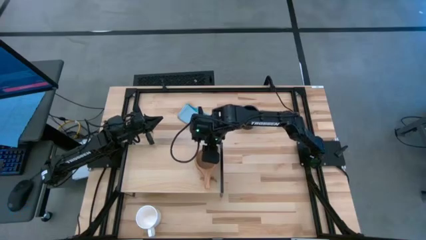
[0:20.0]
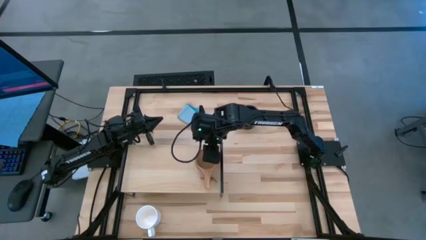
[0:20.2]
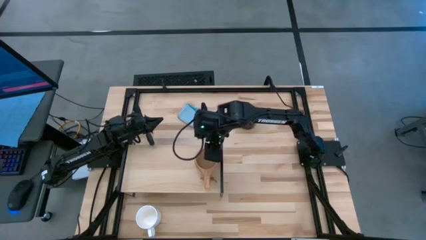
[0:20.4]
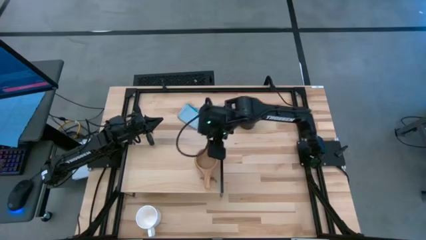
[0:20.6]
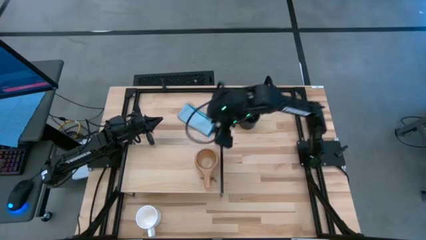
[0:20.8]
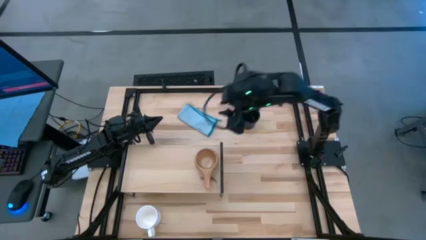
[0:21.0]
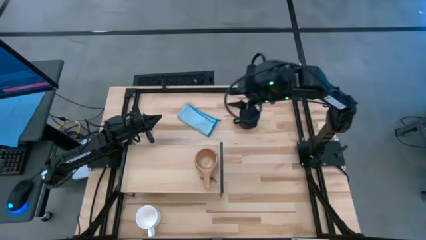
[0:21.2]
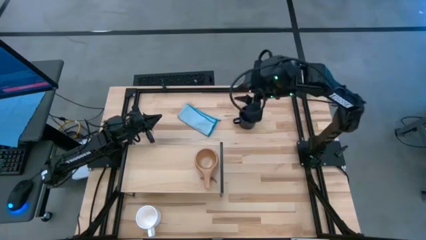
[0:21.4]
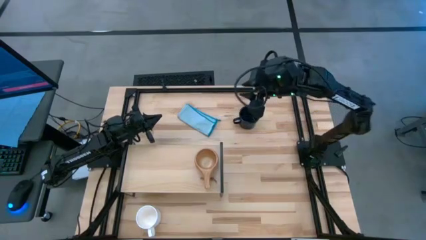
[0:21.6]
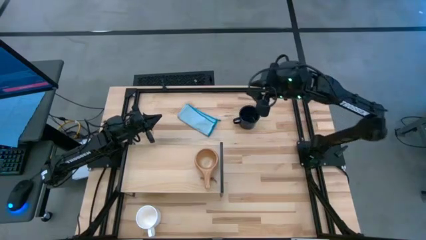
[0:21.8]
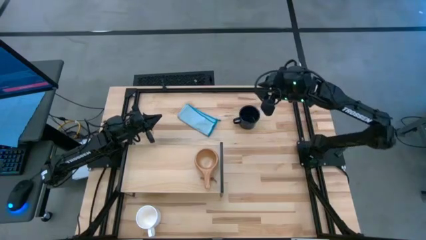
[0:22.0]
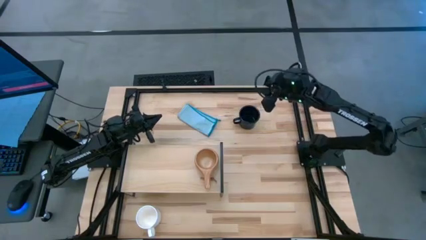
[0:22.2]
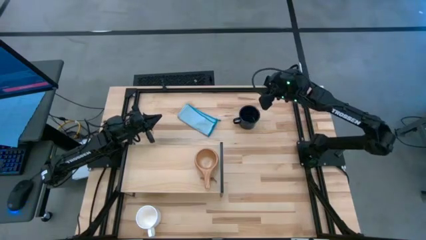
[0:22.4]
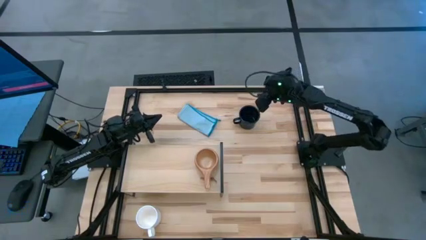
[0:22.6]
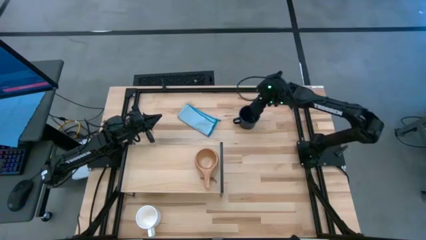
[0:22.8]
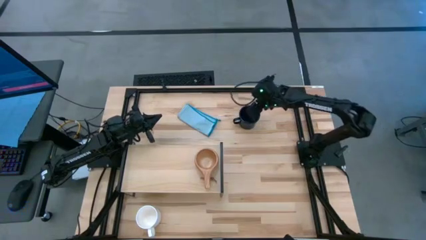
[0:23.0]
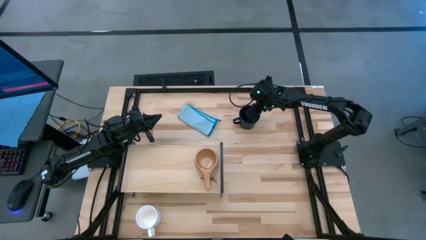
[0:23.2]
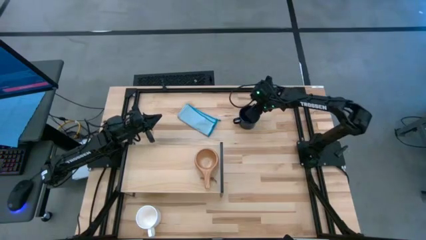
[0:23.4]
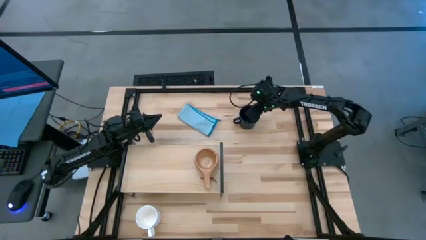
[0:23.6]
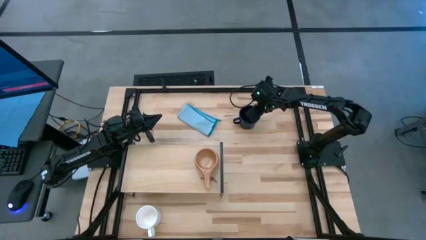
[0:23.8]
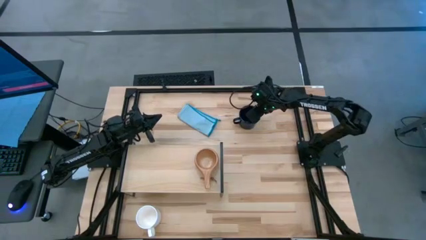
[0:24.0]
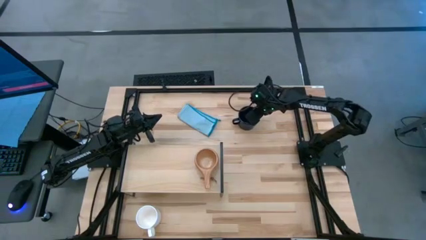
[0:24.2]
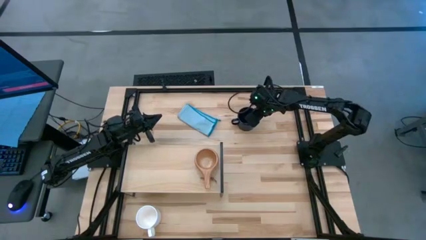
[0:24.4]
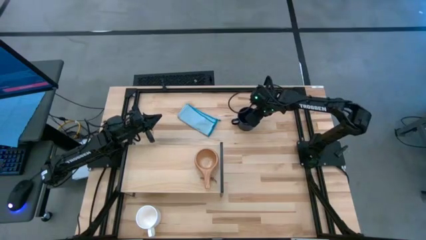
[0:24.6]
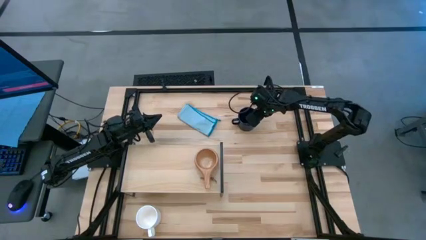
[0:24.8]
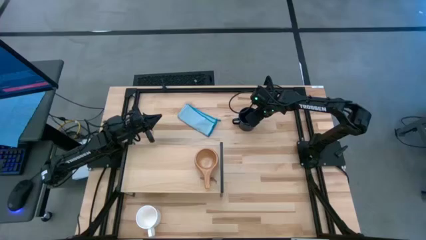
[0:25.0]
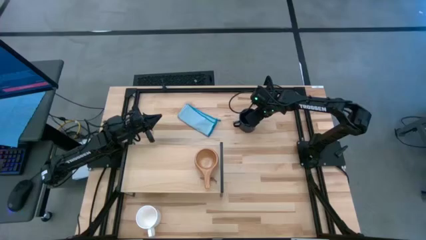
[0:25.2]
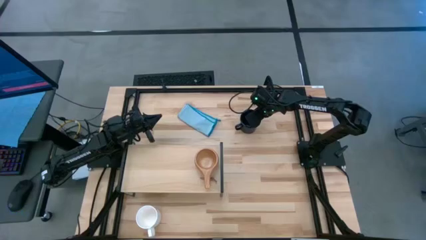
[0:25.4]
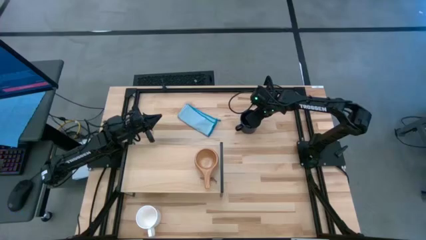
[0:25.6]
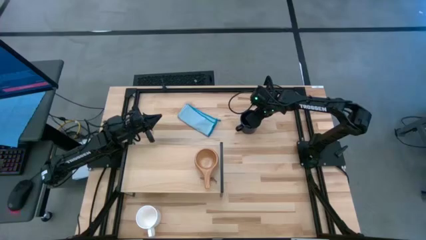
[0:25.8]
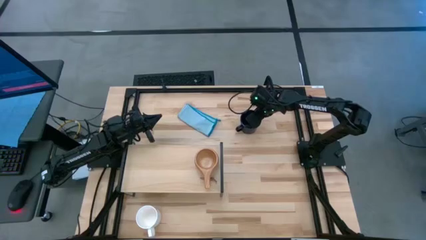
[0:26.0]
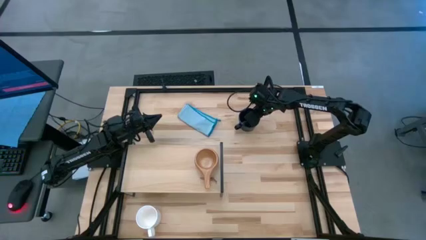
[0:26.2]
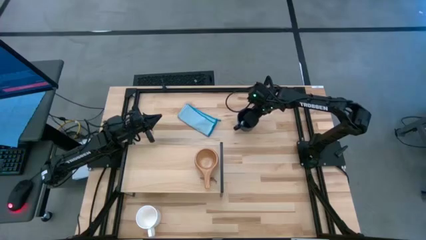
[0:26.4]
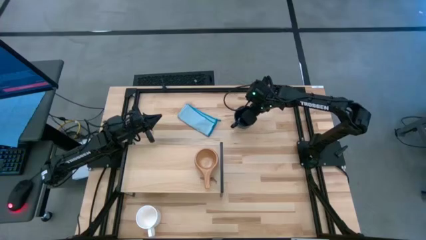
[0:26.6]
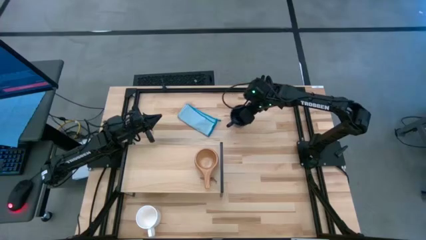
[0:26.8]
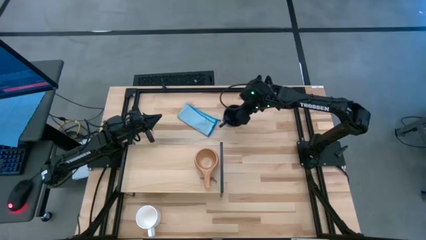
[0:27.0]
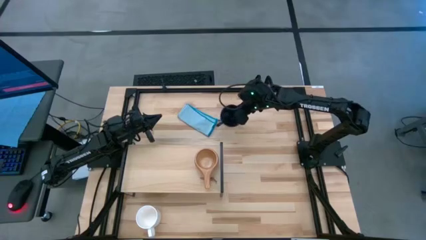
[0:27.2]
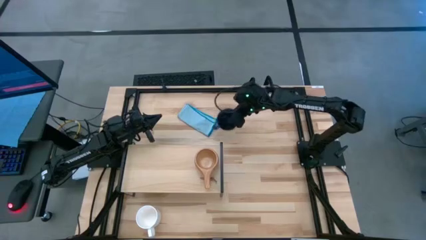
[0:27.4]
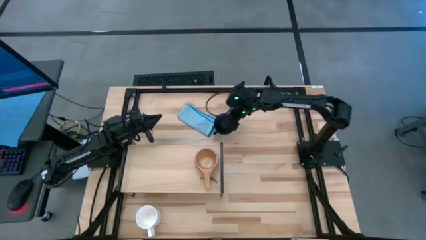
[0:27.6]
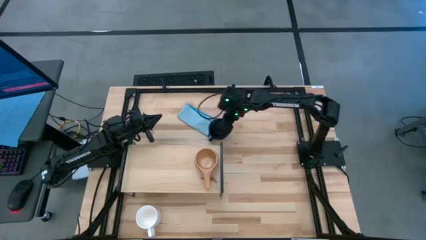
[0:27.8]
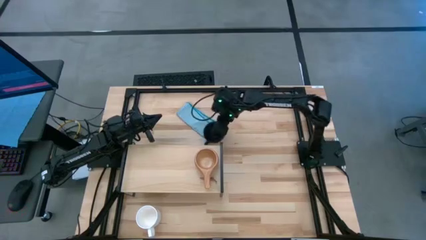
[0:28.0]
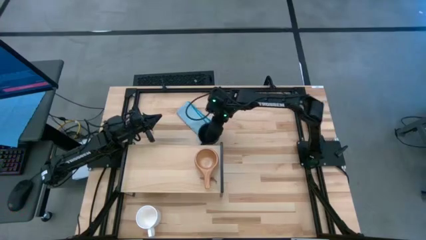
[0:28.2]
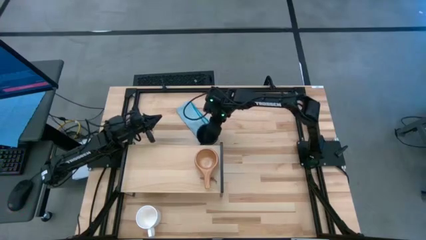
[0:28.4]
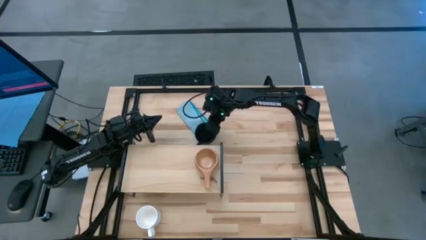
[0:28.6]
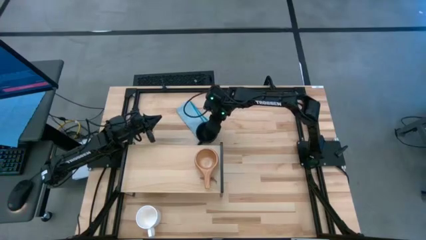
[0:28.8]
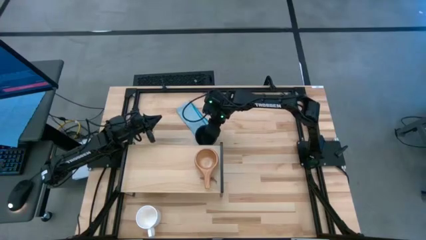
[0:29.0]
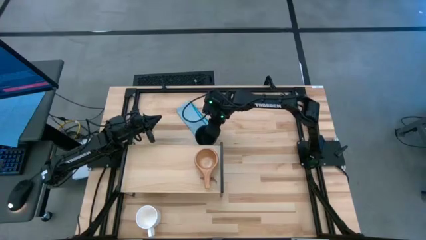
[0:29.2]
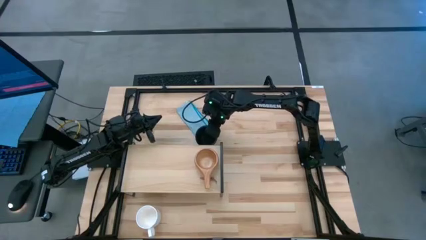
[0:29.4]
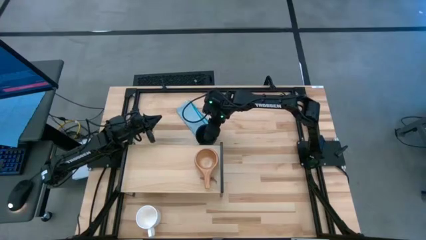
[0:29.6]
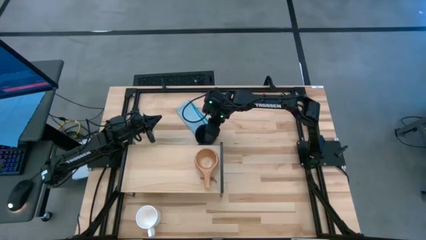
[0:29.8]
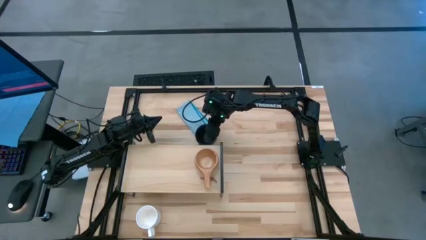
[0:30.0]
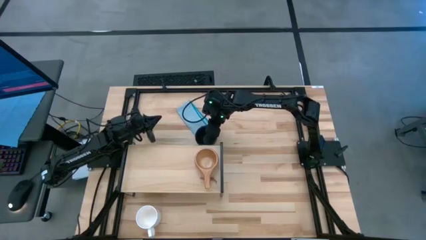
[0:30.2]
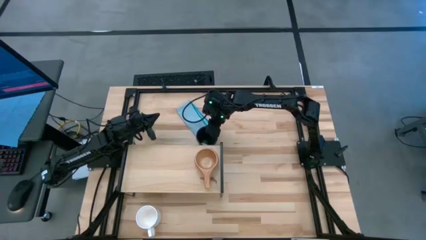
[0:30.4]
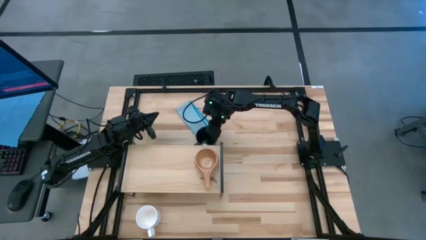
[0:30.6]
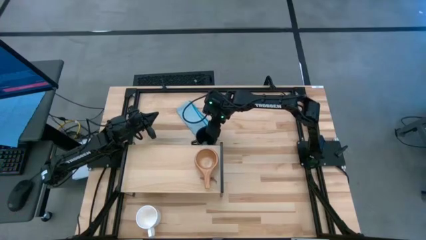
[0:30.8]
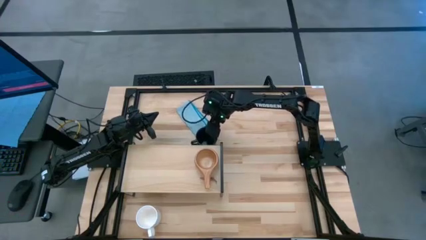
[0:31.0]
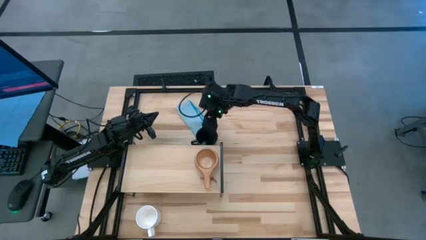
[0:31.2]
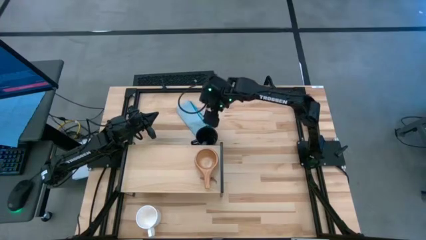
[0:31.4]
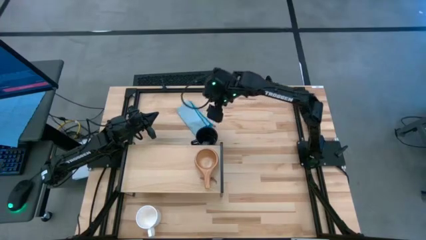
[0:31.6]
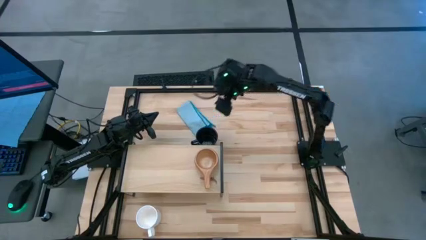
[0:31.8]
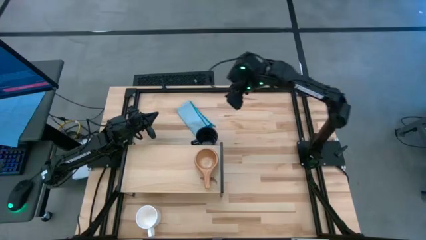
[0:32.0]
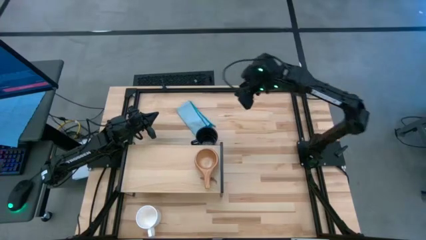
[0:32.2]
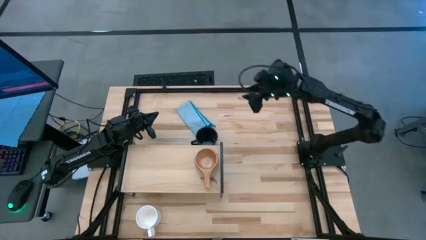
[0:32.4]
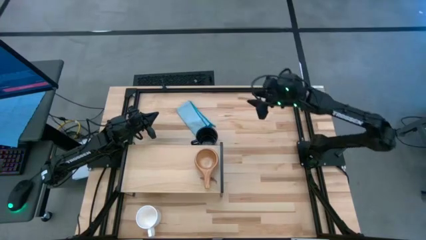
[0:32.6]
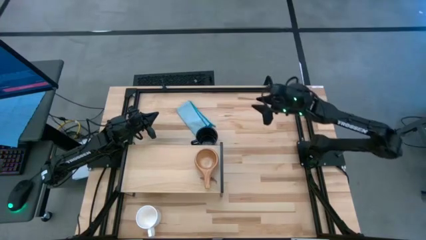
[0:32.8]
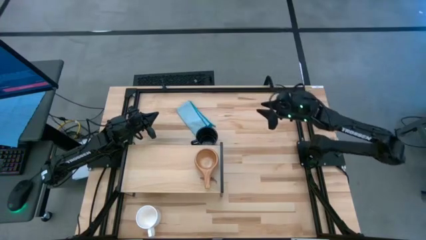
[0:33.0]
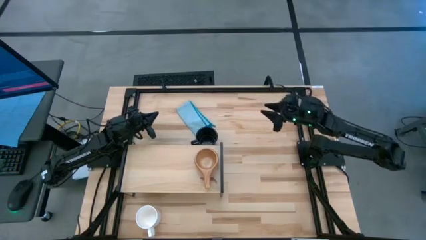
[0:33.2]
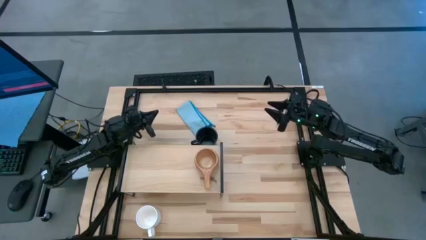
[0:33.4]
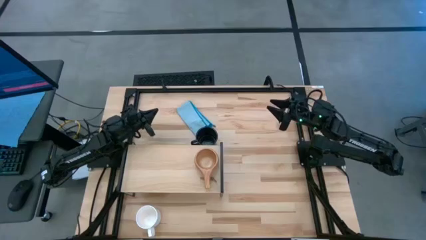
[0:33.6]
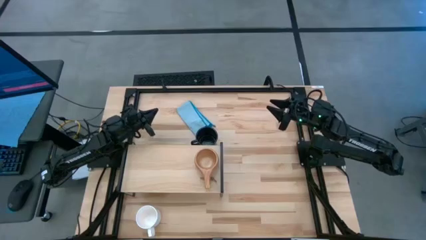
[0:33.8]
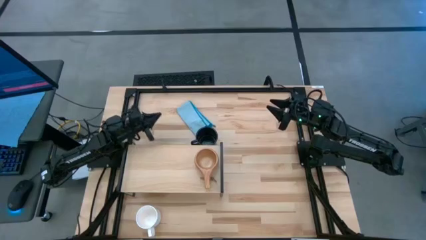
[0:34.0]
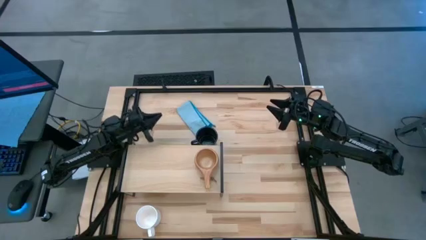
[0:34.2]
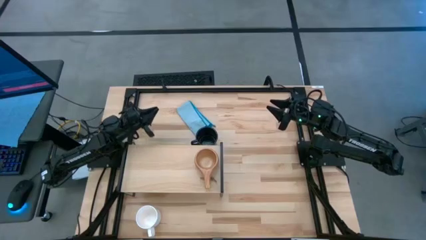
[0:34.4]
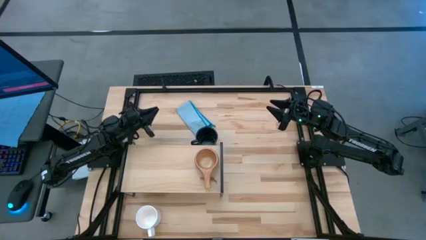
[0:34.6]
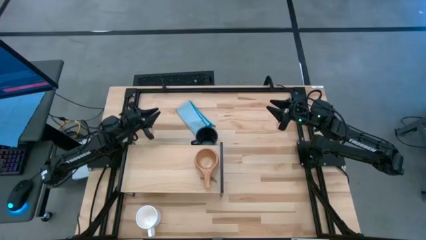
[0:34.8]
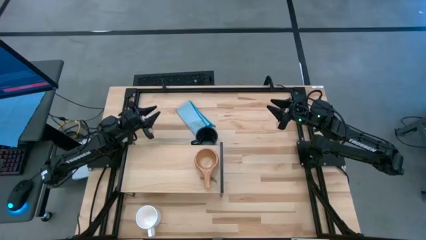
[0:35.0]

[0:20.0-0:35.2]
Task: Stack small to large cups/mugs on shelf
Put the dark blue cup on the shelf
